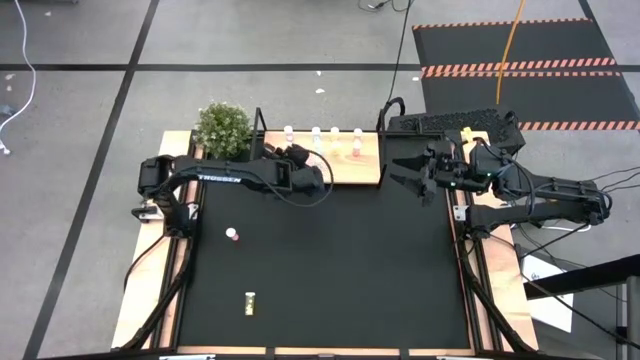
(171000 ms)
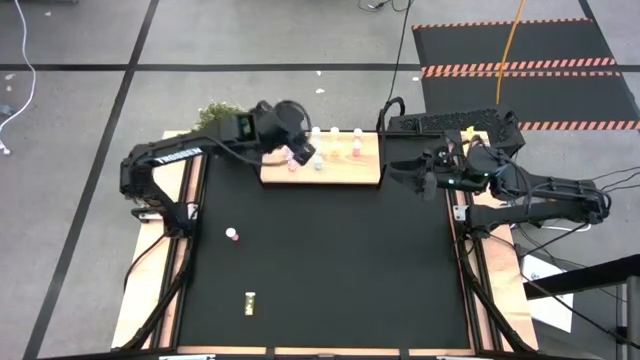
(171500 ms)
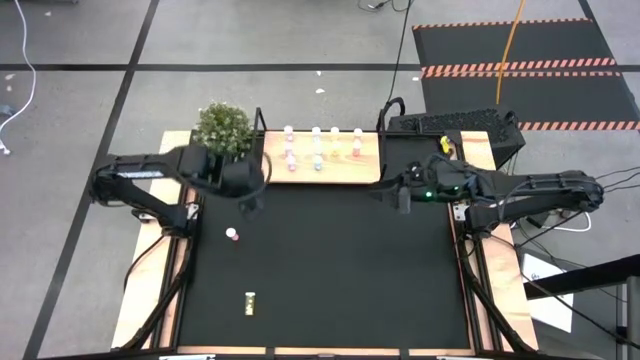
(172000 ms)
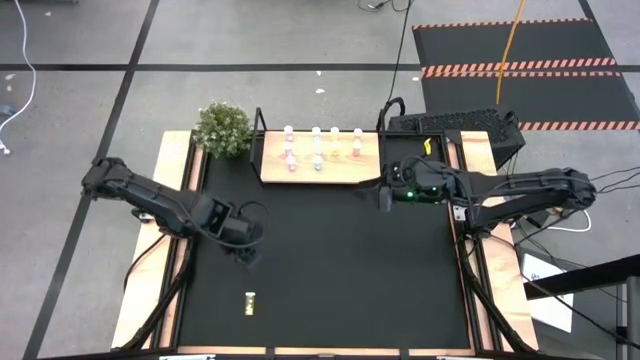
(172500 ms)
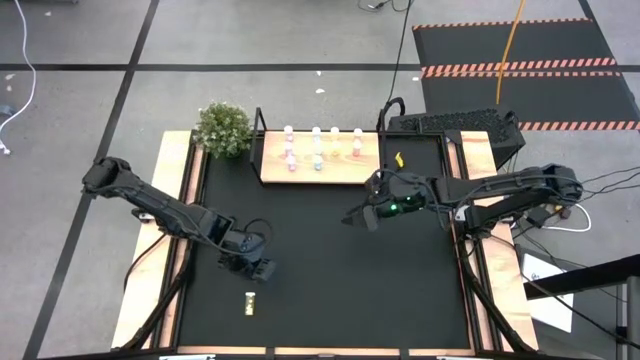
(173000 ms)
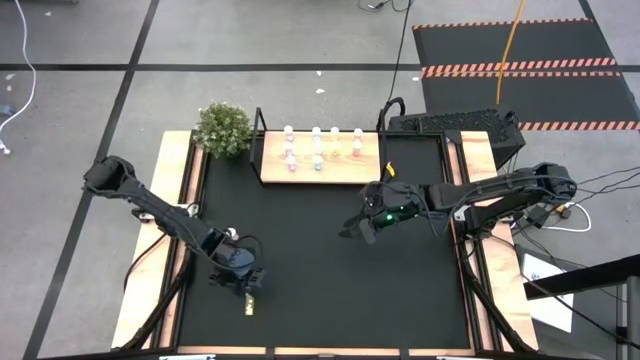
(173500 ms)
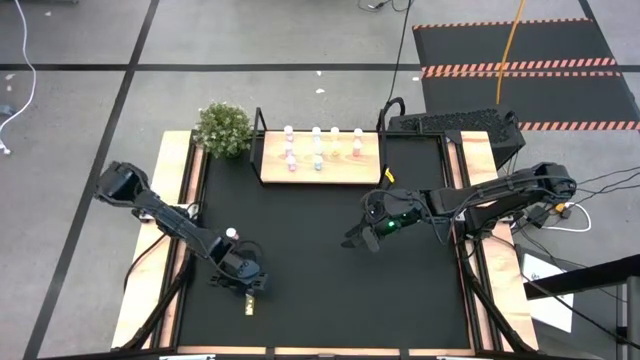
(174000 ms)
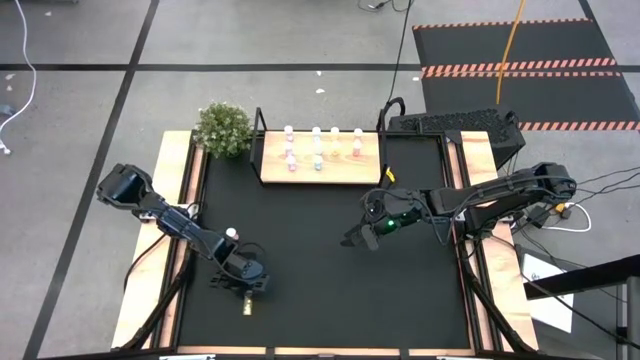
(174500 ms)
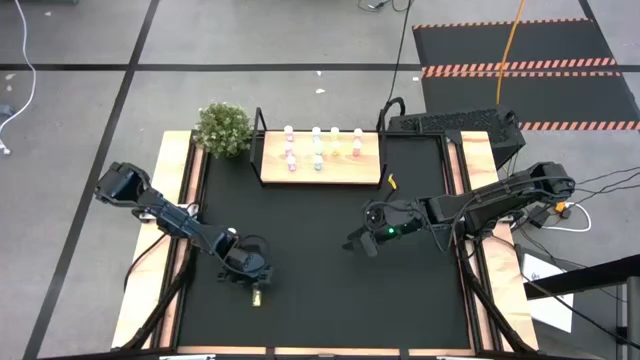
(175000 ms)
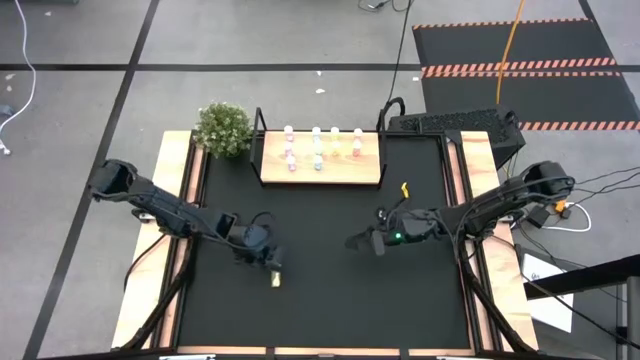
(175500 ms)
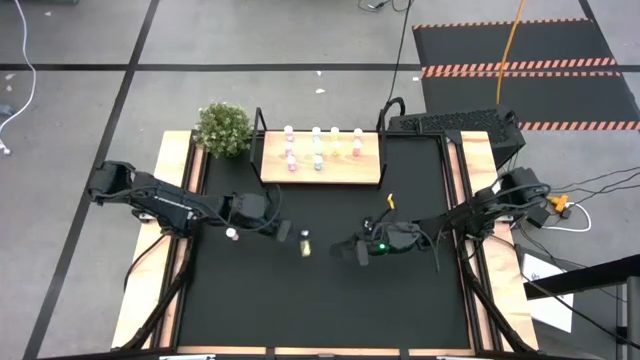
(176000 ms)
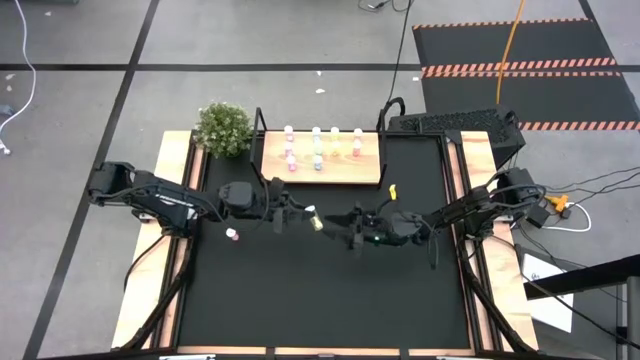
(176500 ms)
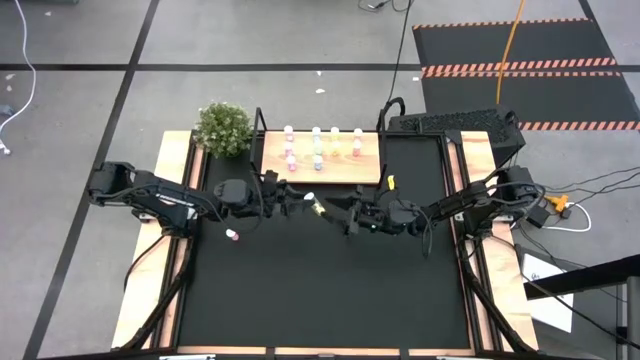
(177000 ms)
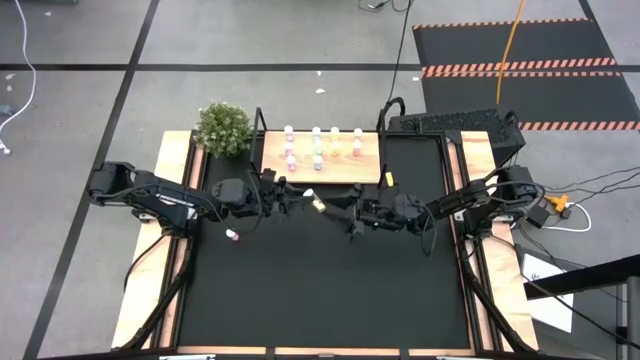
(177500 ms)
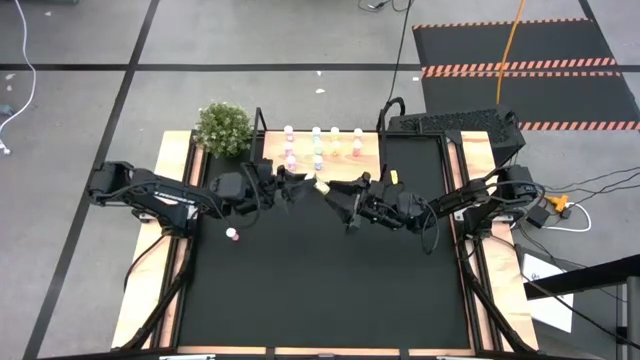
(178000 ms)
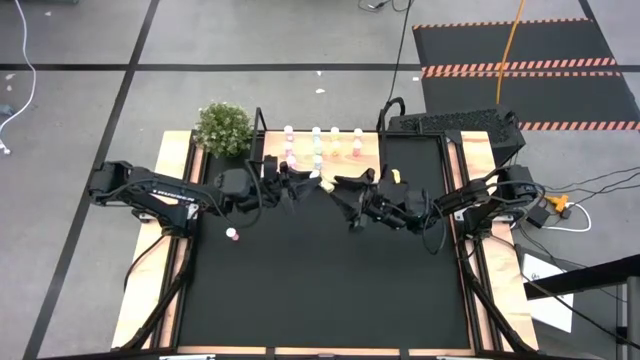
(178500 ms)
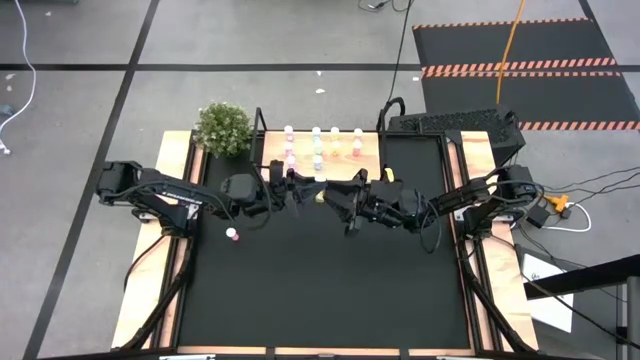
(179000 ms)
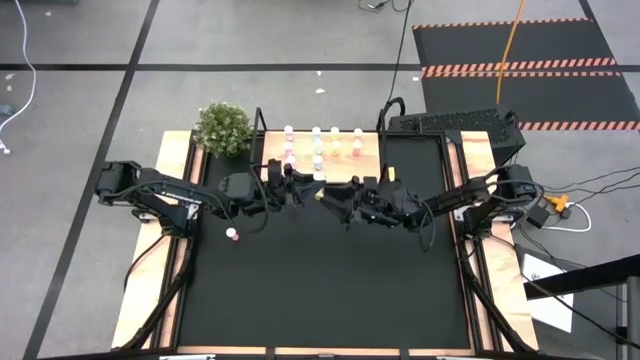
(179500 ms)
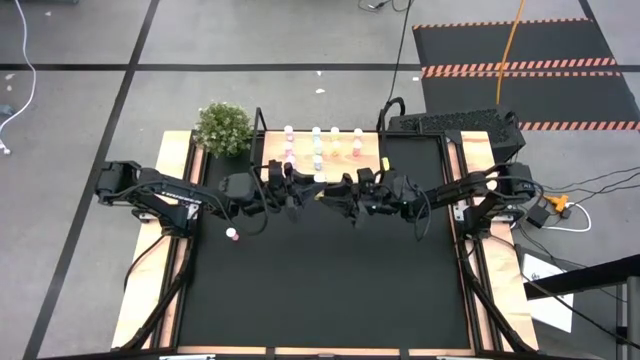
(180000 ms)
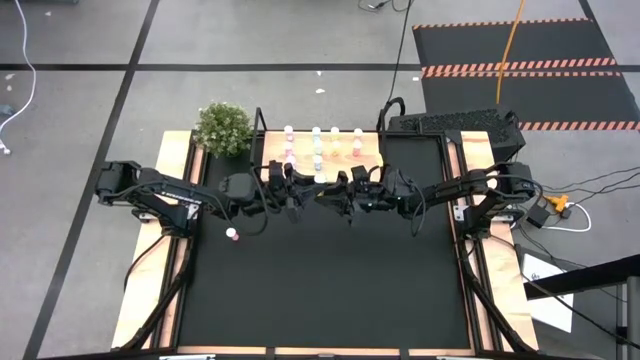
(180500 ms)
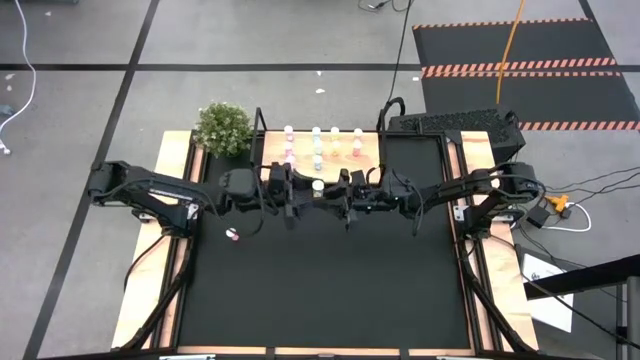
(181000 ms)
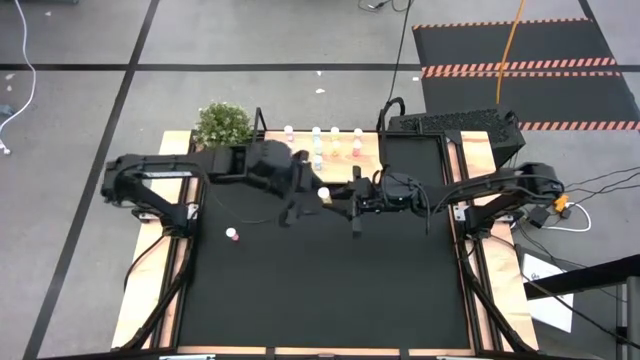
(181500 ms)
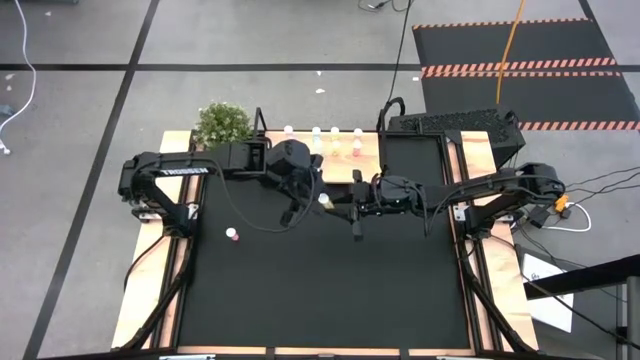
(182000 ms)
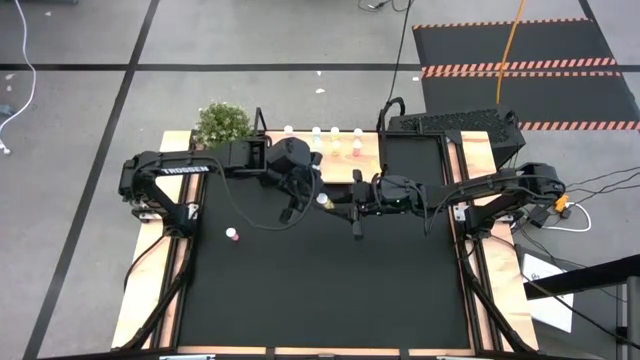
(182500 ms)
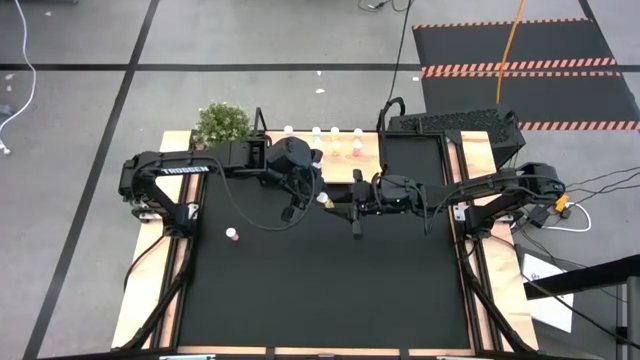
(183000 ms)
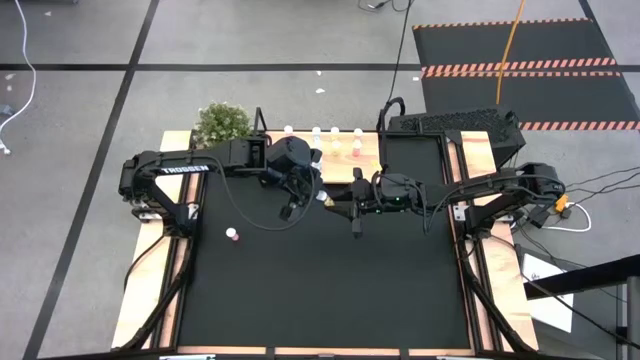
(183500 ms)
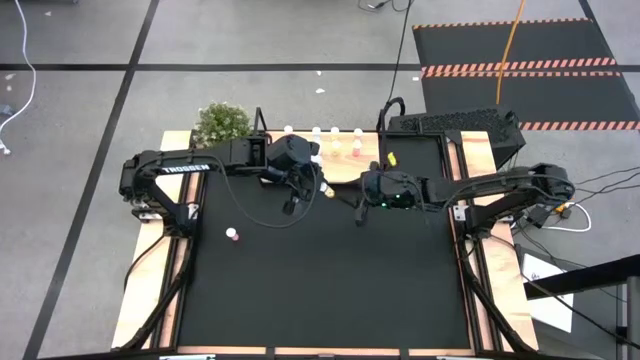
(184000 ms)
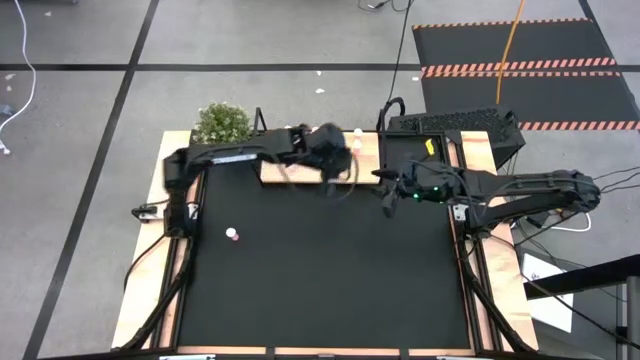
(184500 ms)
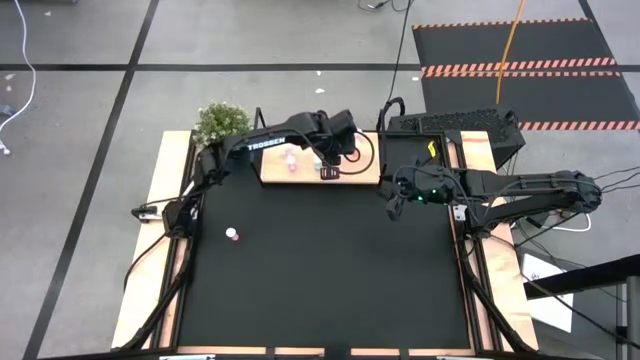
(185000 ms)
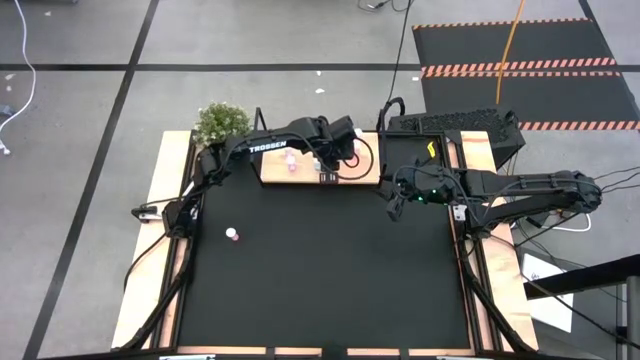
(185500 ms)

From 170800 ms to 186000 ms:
Task: Pick and place medicine bottles onto shelf by color
Put the yellow pill bottle on the shelf aligned with the other yellow pill bottles

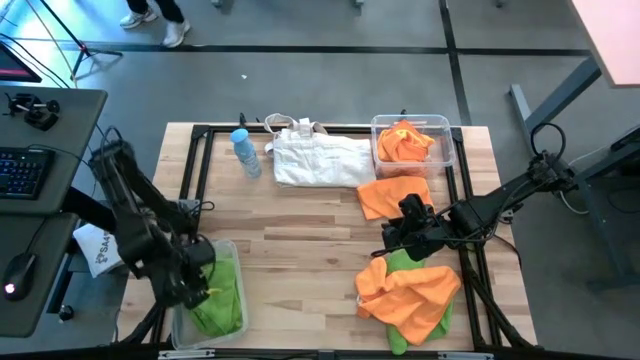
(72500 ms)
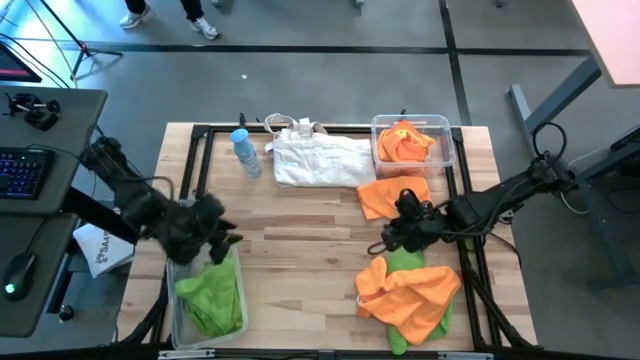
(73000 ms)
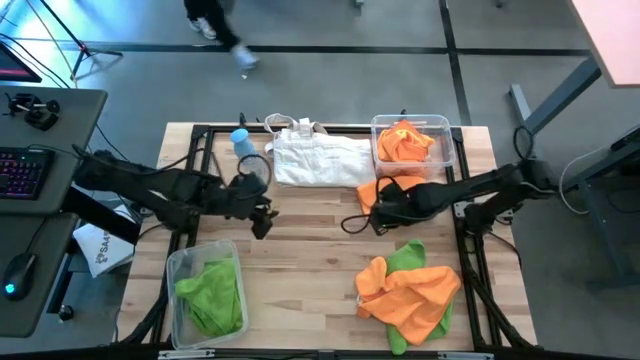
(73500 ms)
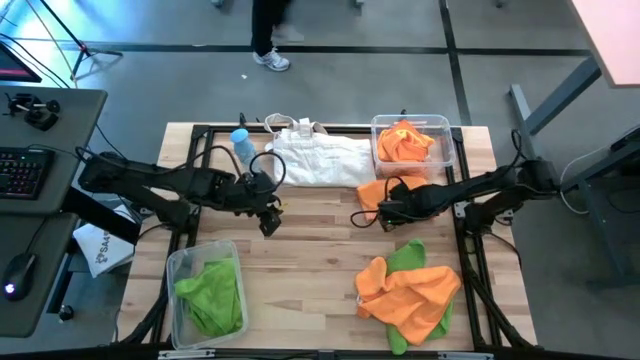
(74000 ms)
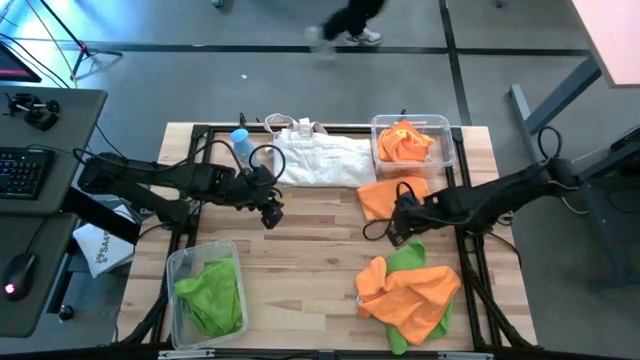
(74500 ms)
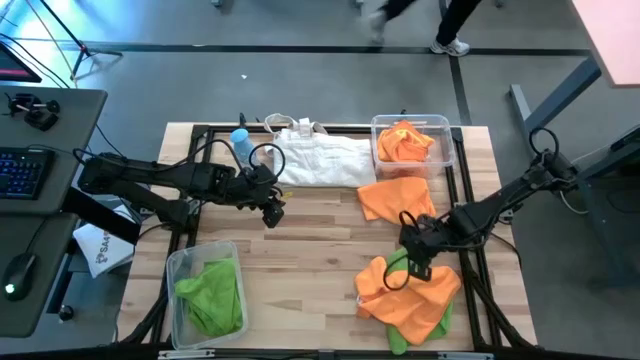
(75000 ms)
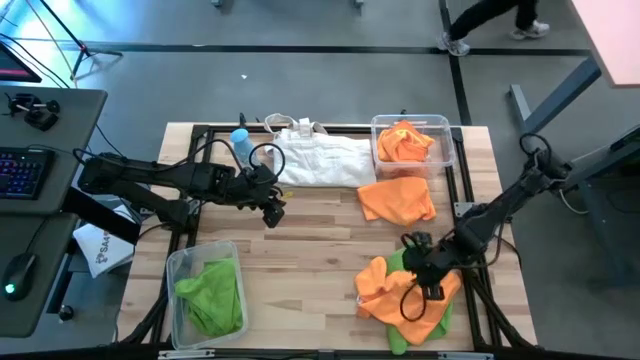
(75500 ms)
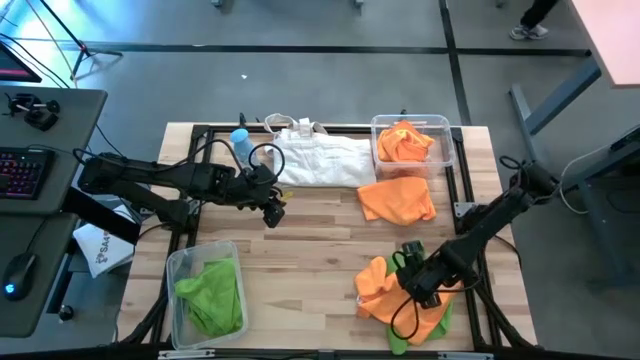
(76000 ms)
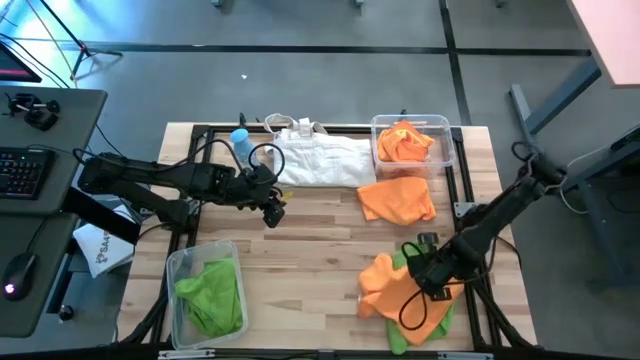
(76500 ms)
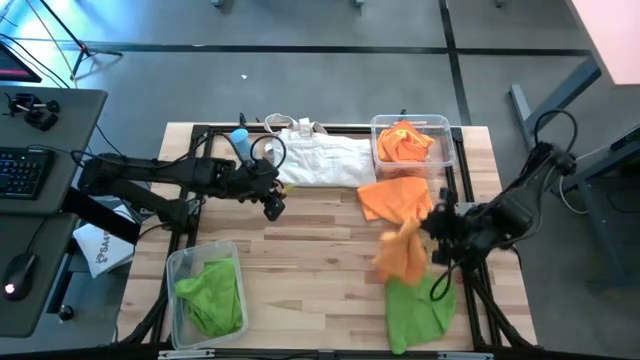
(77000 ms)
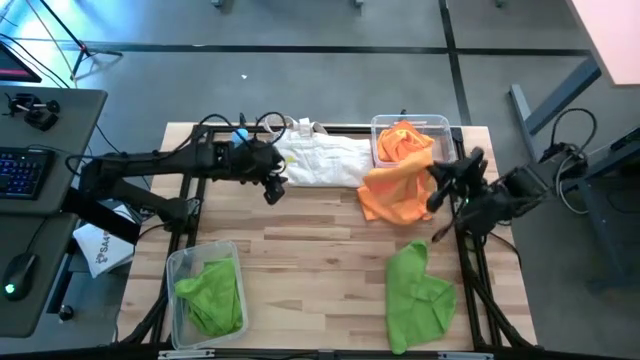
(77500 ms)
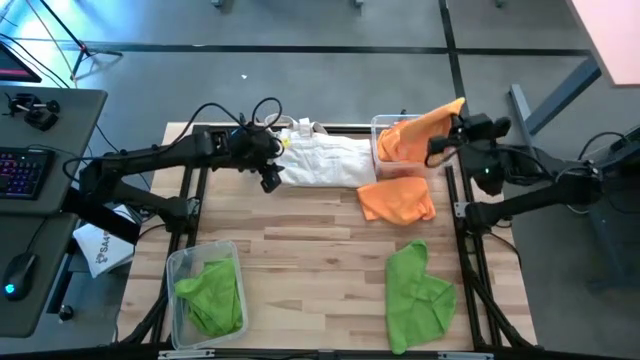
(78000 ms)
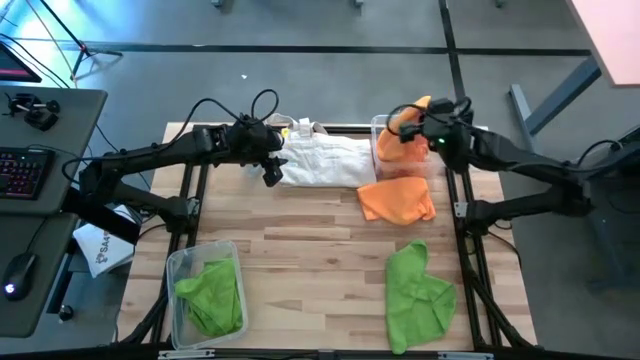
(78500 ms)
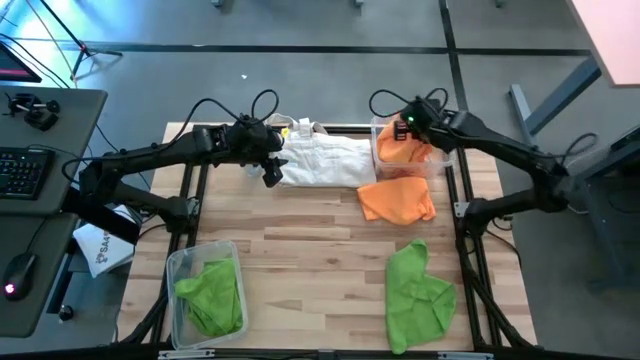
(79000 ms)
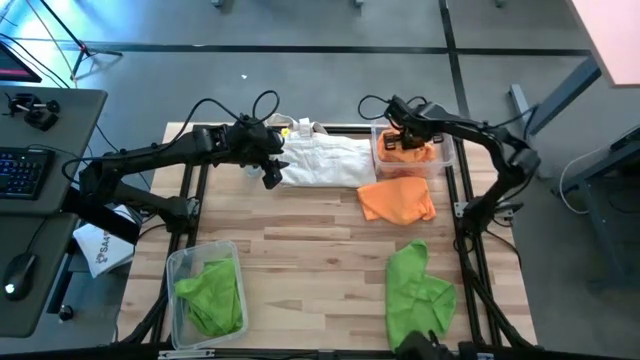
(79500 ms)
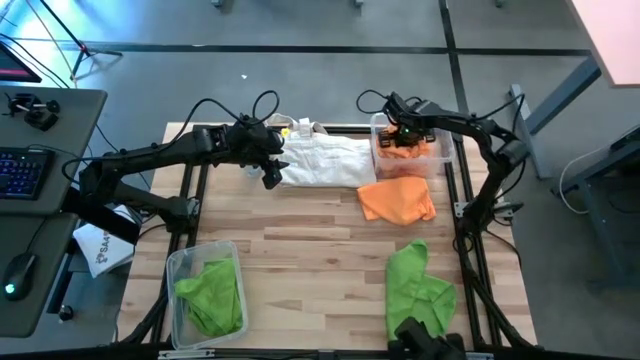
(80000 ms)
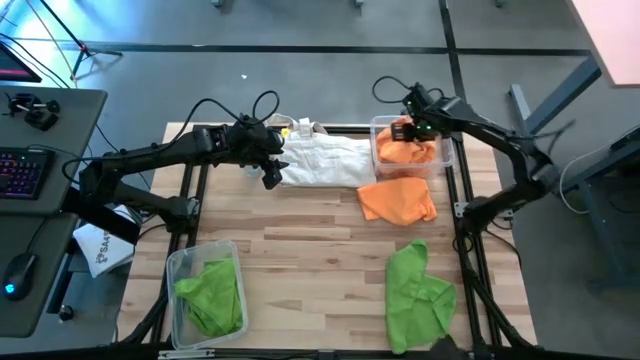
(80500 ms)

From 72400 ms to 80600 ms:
Task: Sort microfiber towel by color & place in baskets
Put the orange microfiber cloth into the top transparent bin
